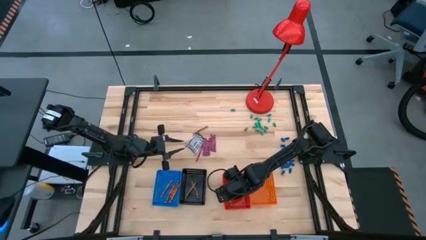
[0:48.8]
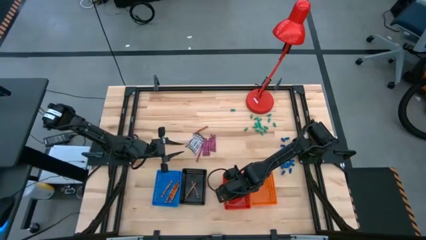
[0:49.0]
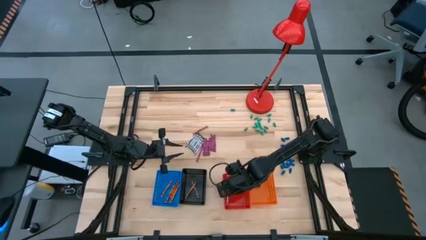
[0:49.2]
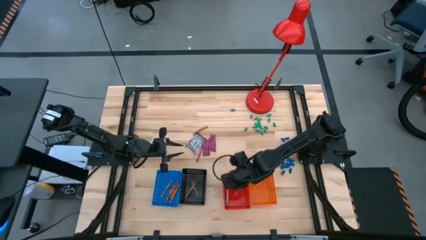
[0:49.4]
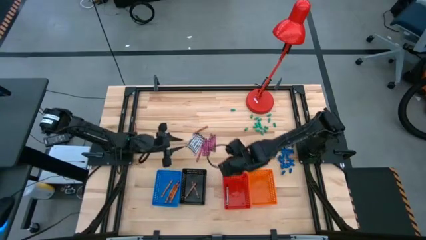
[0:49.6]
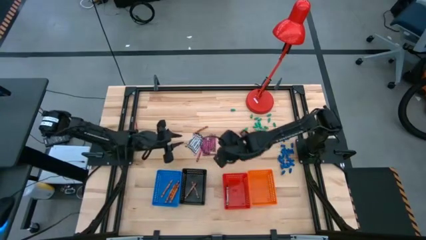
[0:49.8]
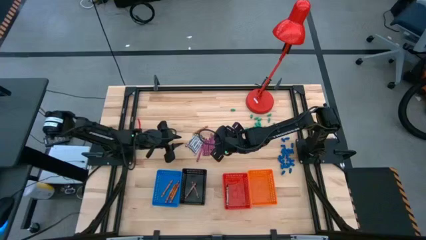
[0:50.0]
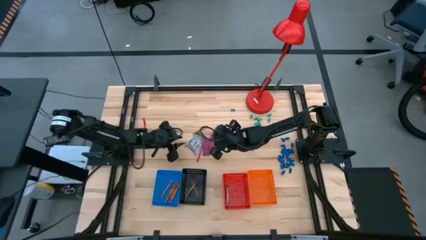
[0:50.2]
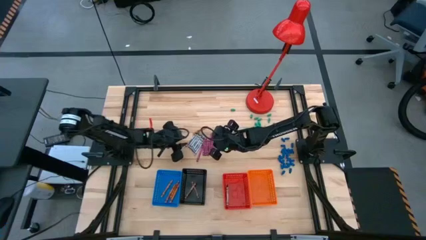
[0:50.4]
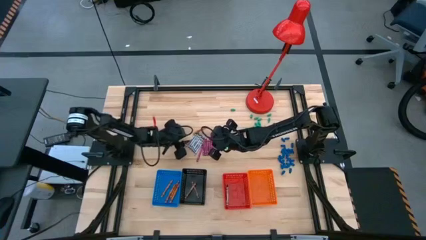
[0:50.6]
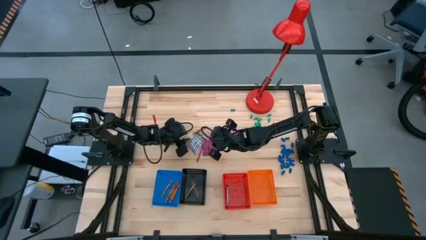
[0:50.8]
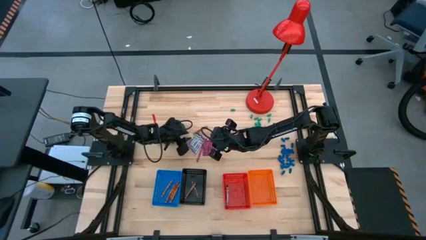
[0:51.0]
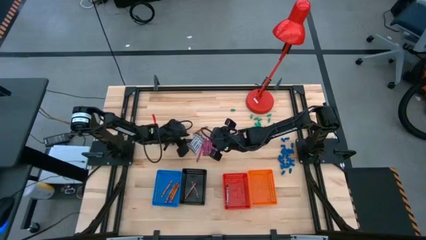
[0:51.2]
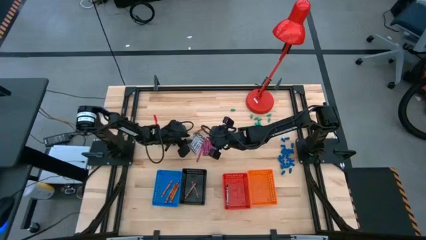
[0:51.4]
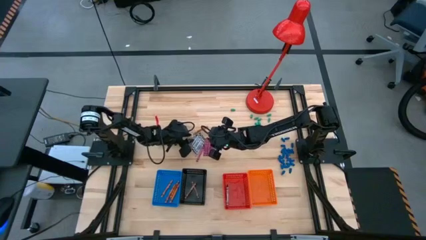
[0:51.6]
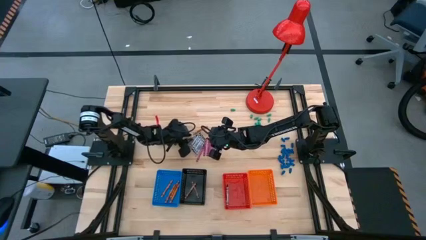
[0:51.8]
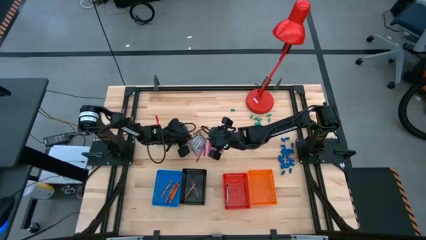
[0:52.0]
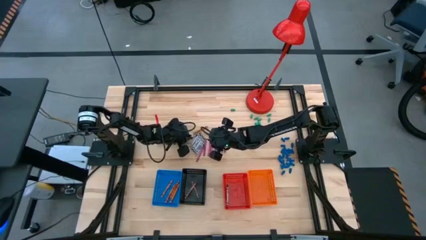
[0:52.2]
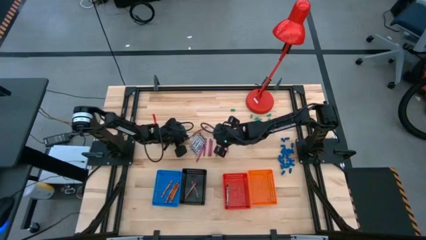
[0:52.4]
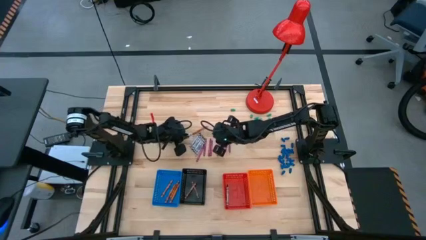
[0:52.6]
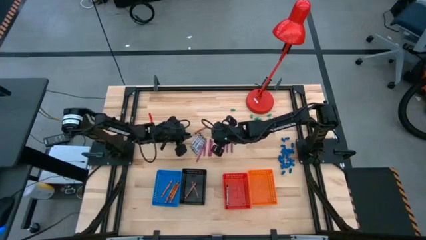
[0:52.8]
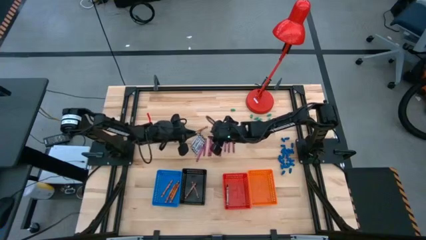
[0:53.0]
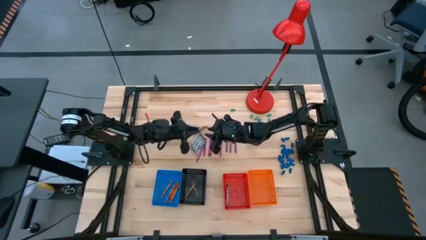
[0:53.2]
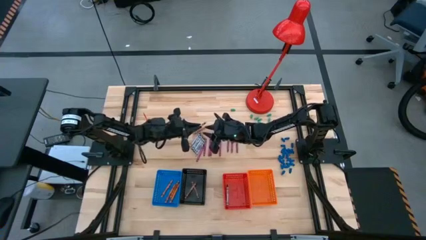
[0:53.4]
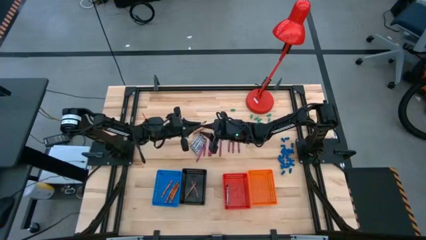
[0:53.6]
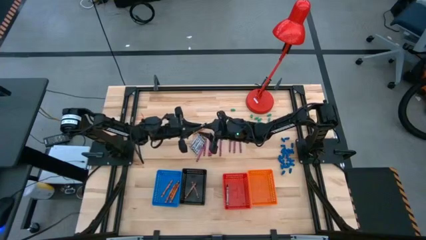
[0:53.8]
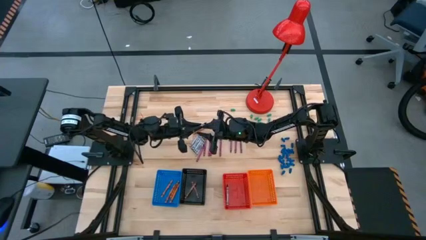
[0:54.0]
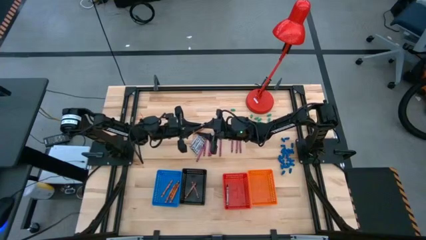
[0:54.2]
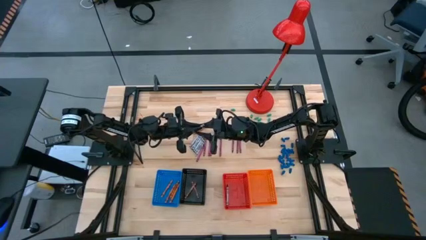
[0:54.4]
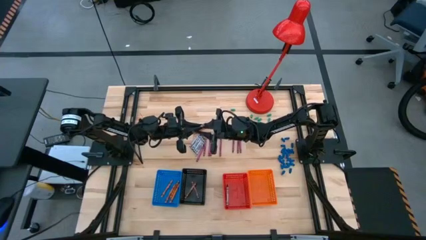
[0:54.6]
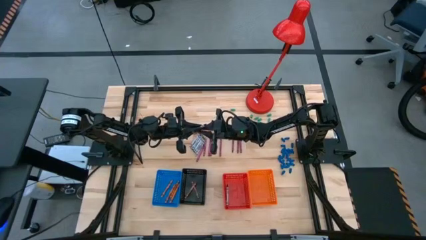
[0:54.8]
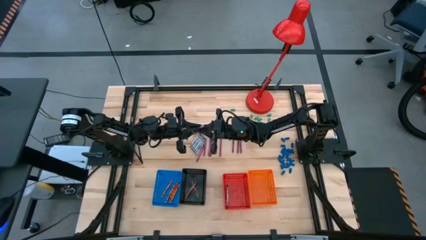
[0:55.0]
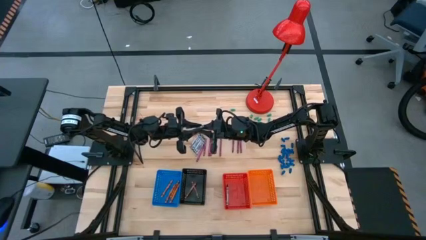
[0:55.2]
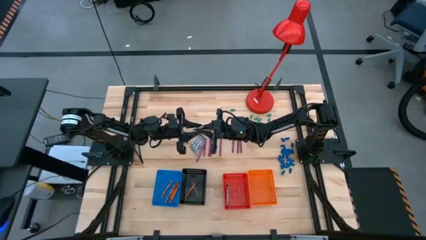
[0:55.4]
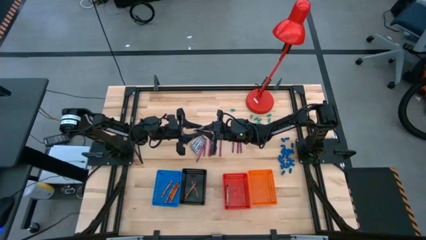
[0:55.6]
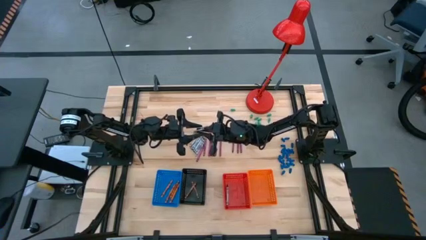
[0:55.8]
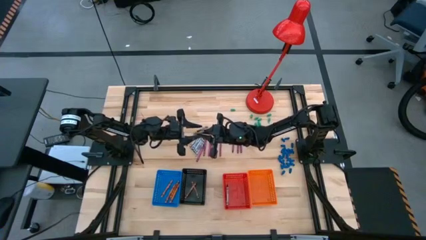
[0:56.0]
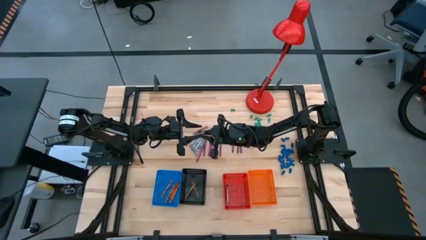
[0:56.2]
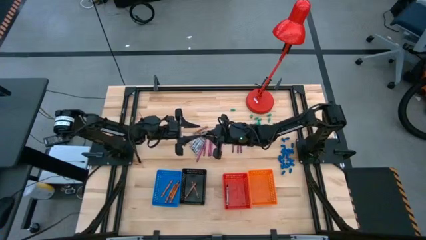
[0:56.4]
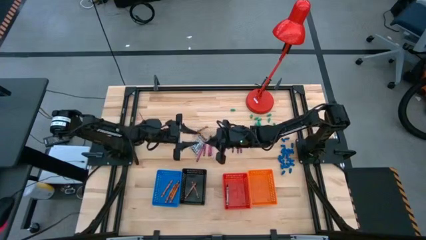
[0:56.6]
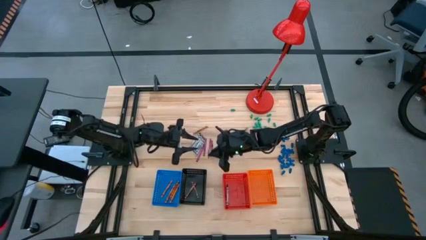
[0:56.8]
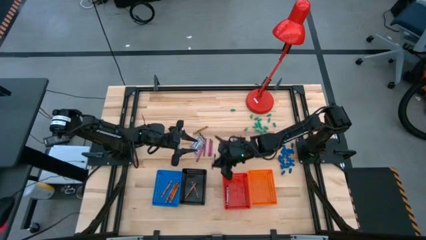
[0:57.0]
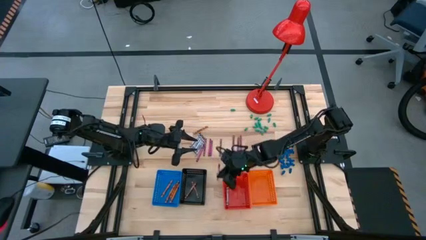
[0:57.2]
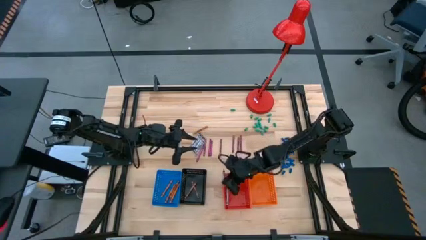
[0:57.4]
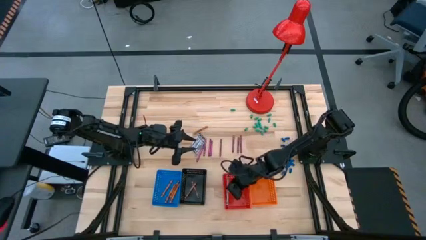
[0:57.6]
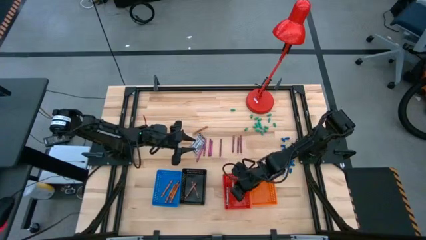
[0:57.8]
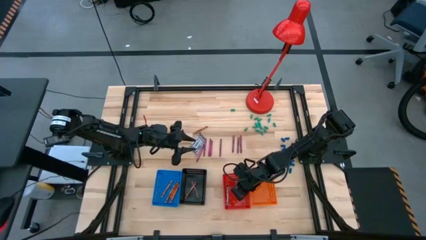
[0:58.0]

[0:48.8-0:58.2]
Task: Sort crayons
Put the black crayon into the red basket

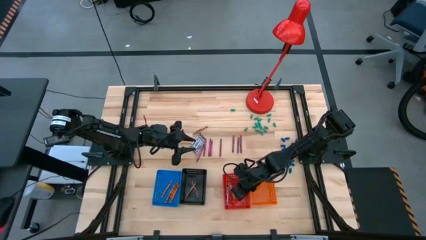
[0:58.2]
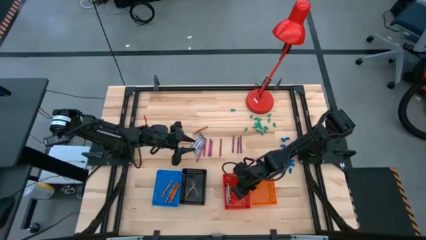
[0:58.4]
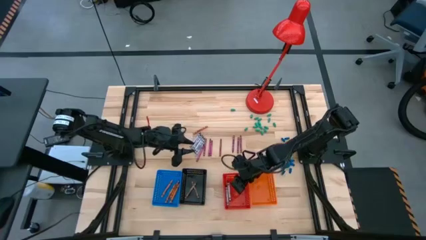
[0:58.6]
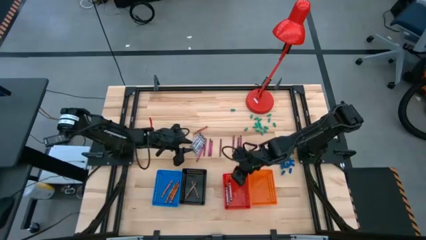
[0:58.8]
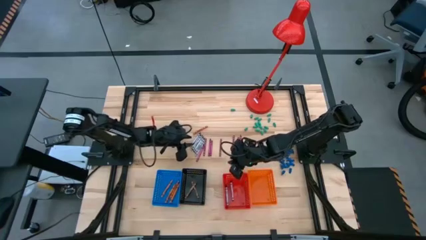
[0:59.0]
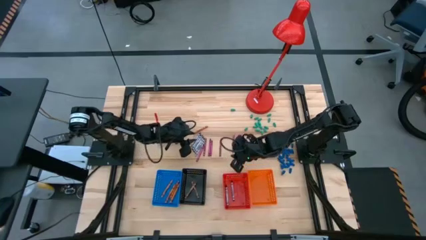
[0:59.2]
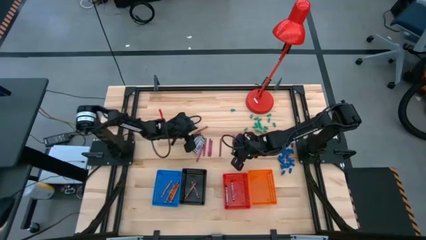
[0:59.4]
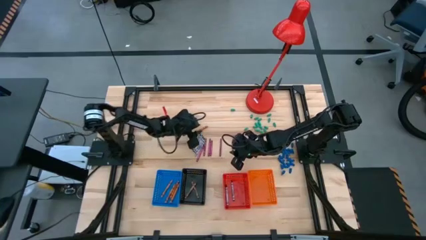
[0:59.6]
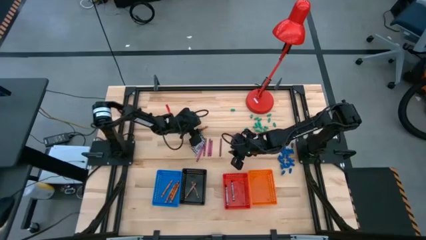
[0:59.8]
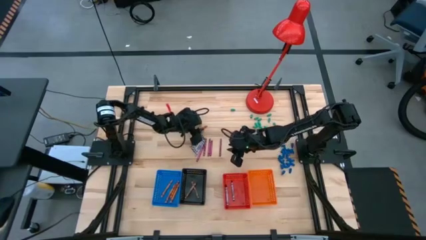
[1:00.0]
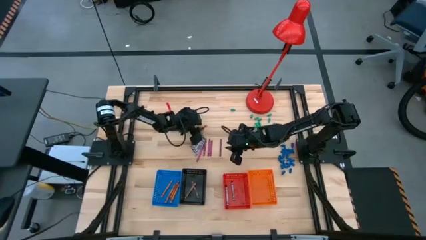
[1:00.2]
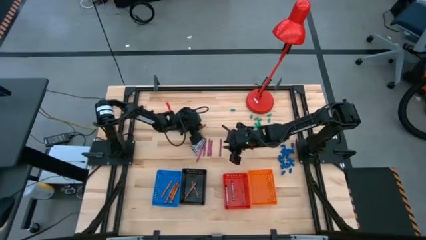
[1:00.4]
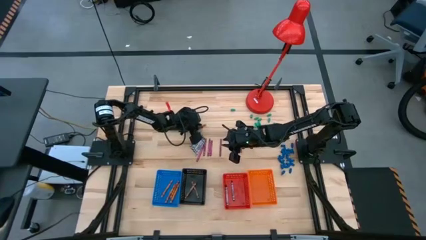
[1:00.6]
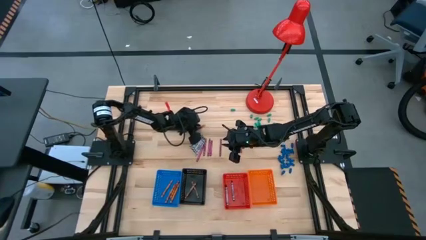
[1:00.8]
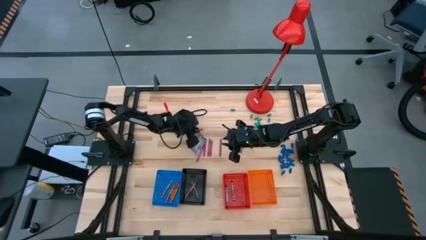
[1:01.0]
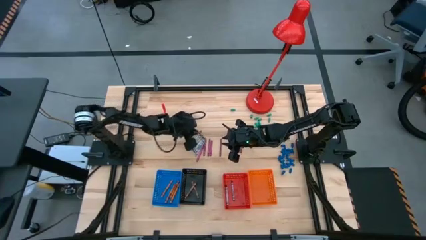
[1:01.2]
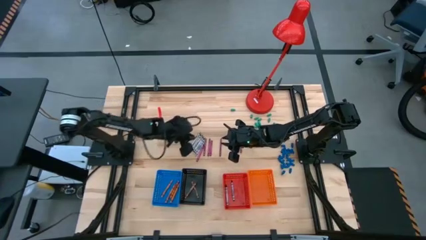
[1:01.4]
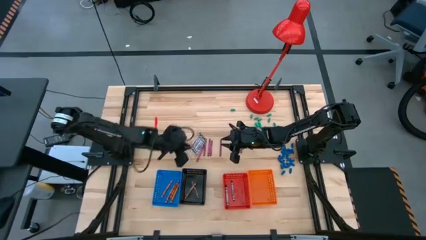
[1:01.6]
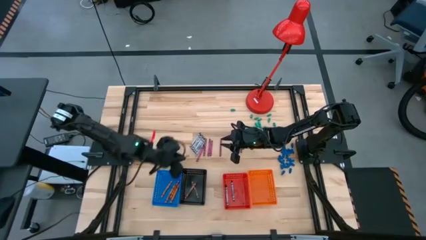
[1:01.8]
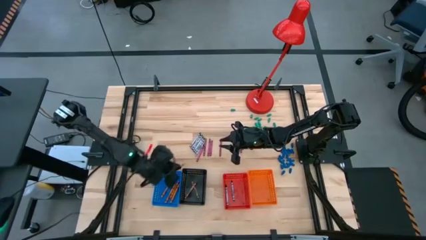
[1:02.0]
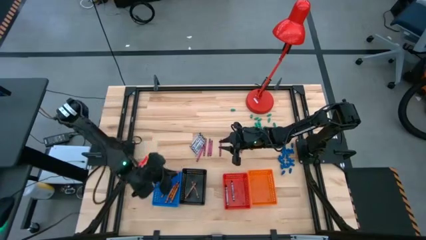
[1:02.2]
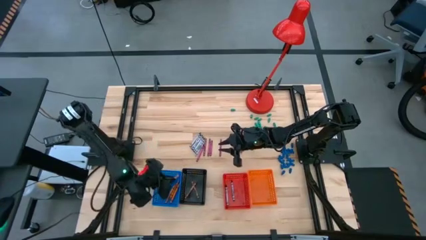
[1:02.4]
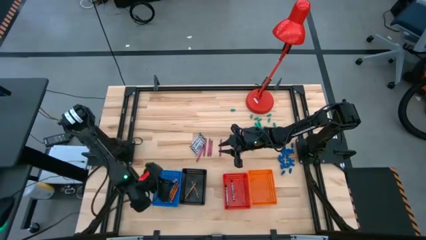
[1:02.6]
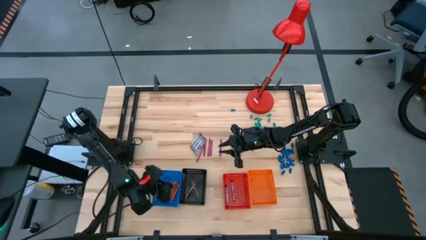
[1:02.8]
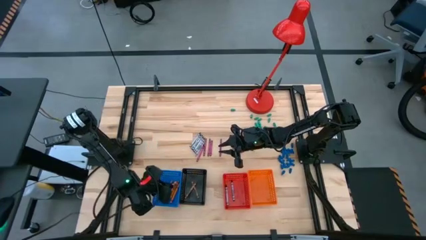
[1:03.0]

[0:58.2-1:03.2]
Put the orange crayon into the blue basket
